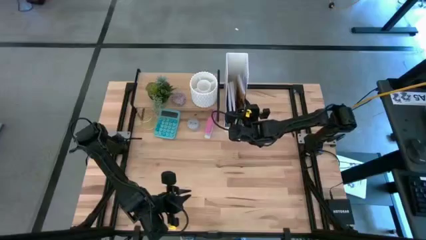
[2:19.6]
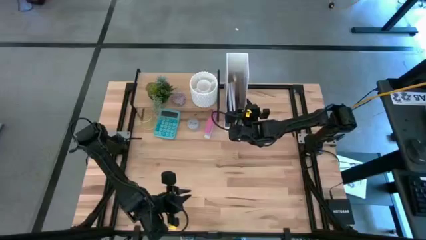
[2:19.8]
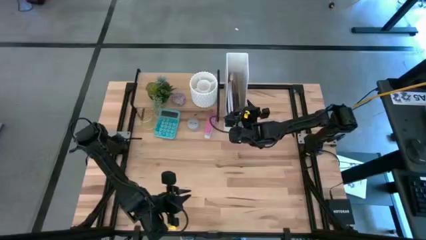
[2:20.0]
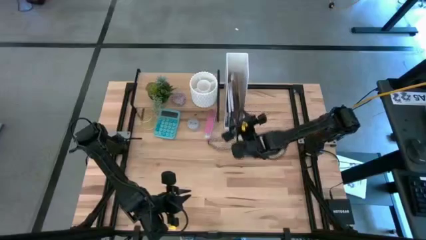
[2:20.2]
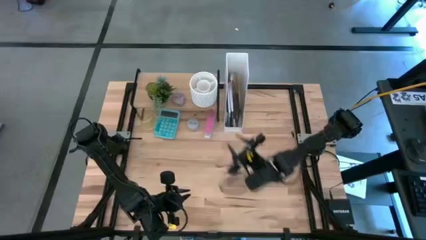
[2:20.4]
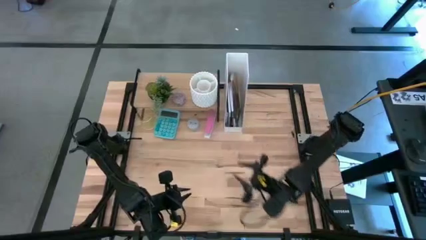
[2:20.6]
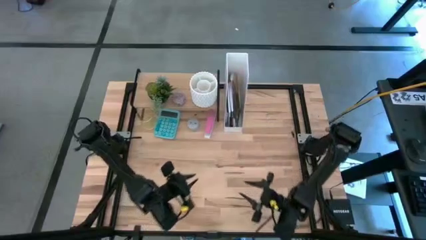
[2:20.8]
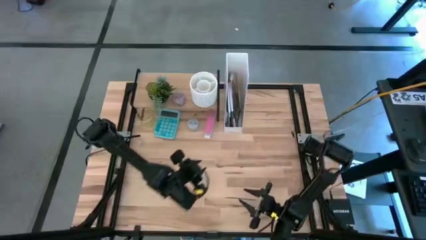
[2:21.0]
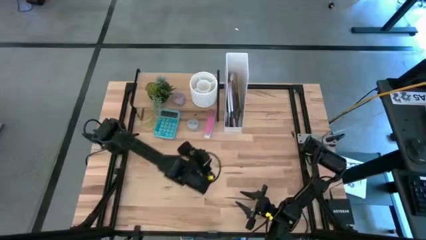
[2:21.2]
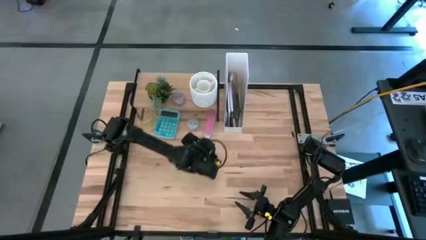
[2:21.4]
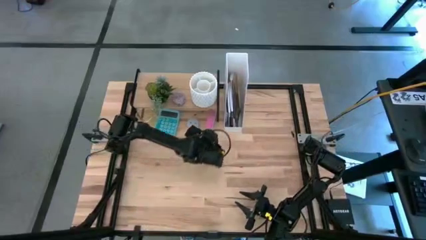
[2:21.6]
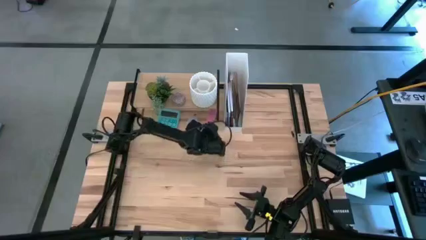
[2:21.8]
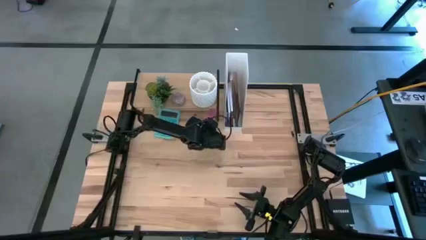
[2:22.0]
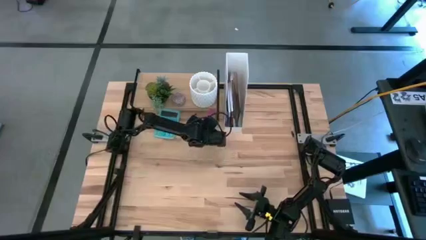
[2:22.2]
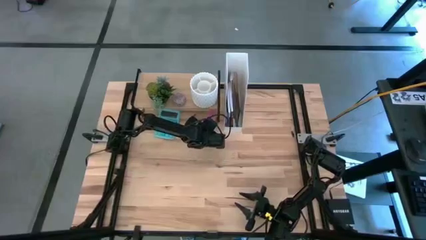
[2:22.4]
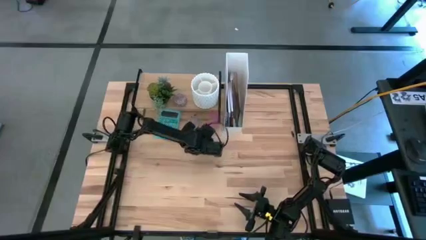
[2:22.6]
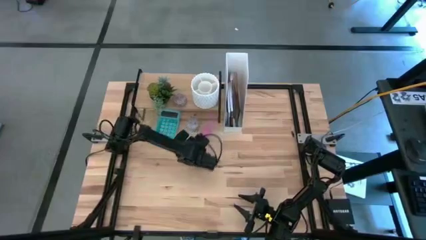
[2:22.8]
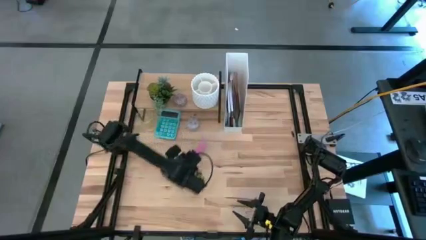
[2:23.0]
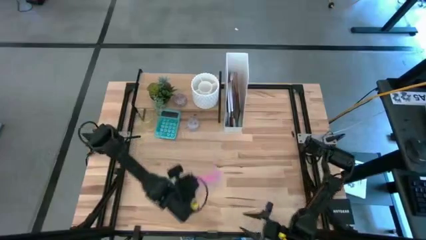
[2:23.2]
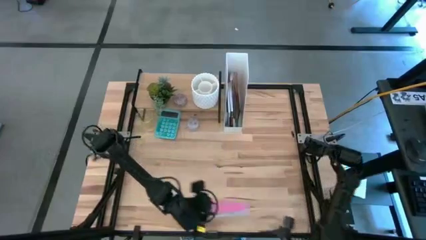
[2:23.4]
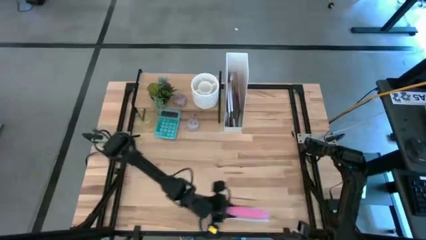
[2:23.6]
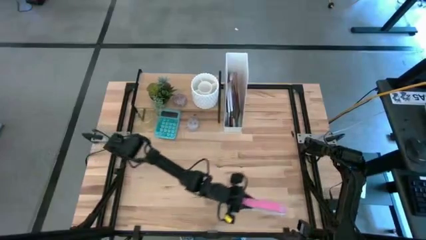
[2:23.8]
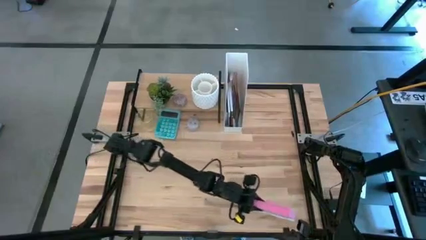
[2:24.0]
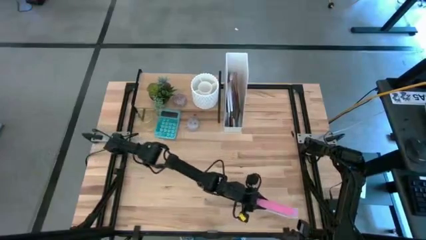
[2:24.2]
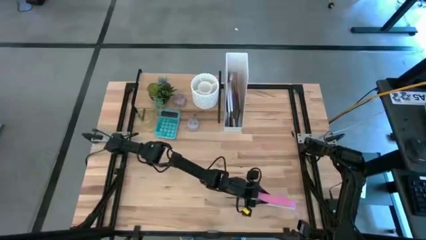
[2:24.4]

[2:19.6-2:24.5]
Task: Stock shelves
Remove the pink stapler from under the shelf

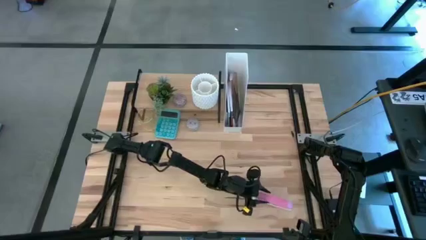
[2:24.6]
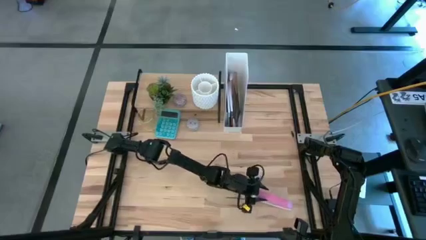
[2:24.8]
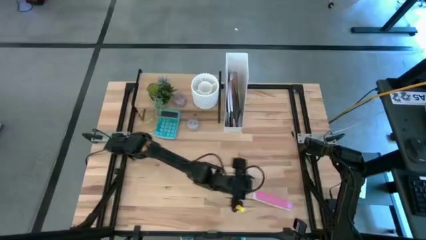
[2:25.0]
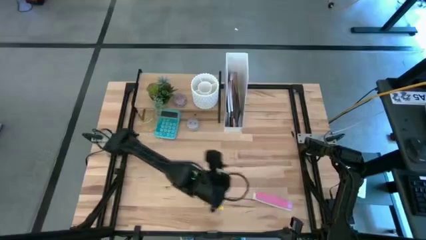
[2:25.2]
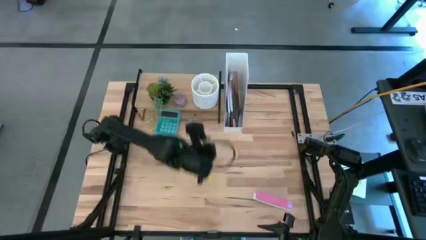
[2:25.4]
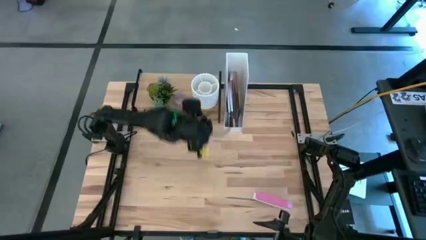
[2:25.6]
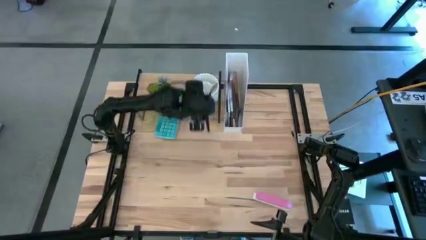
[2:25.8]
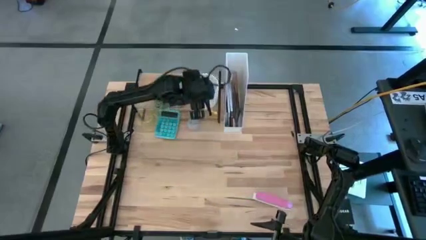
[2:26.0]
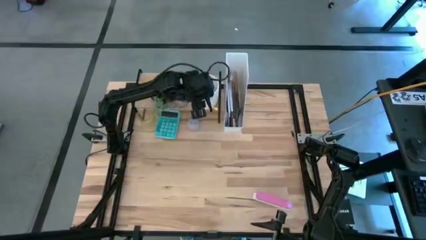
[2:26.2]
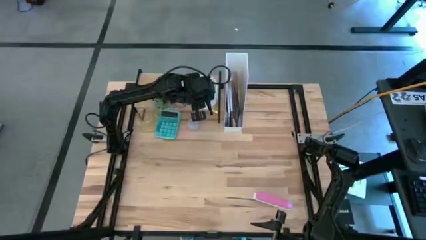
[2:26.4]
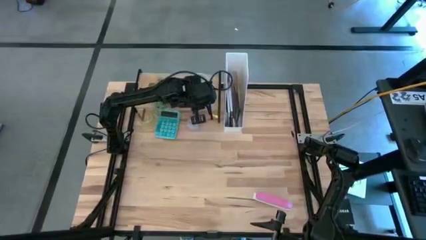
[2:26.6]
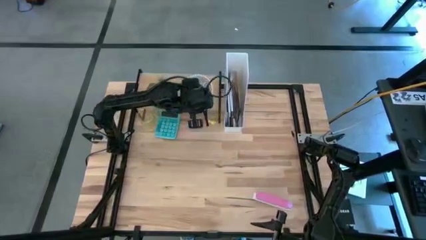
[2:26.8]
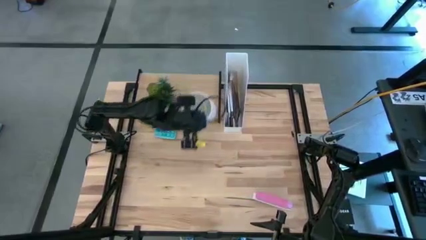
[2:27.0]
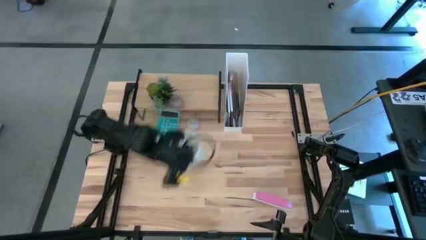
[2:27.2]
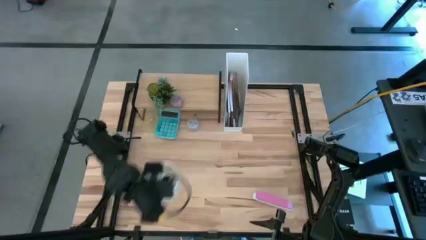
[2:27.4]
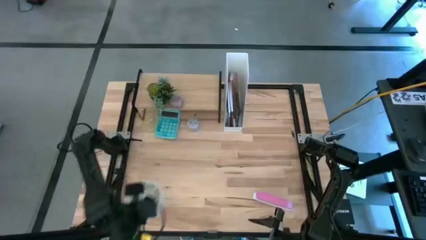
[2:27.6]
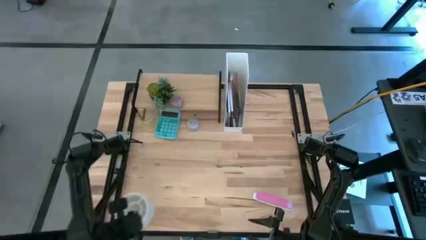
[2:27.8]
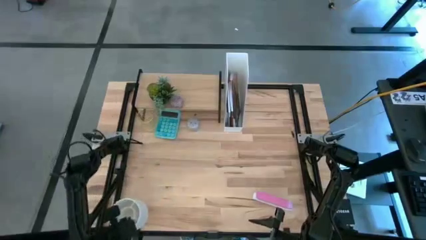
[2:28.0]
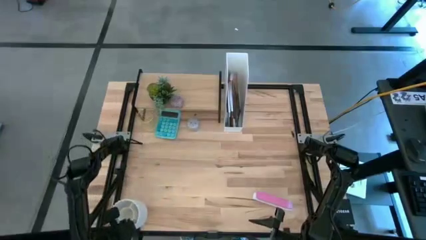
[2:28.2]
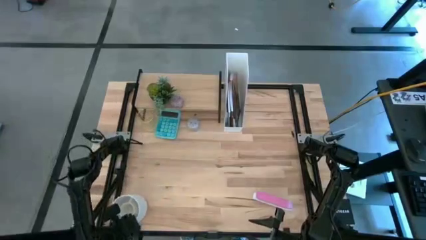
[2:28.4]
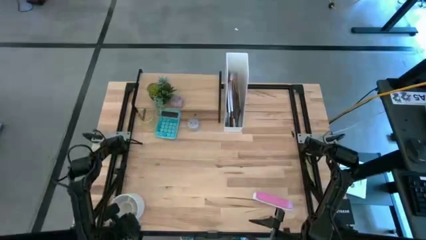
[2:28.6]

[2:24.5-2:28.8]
Remove the white pen organizer from the shelf

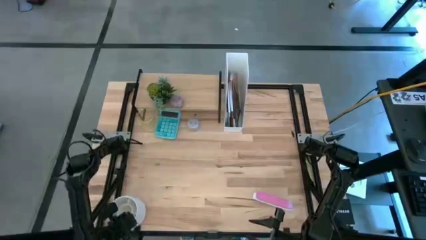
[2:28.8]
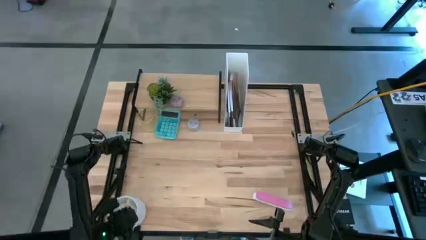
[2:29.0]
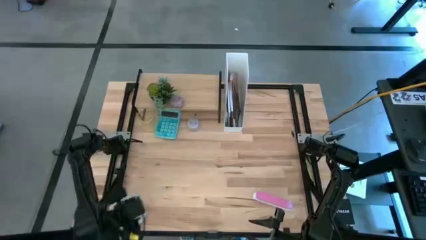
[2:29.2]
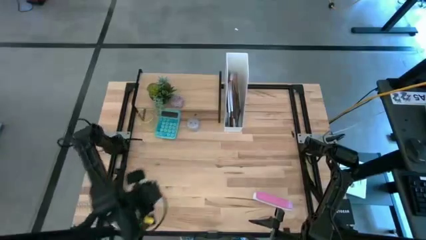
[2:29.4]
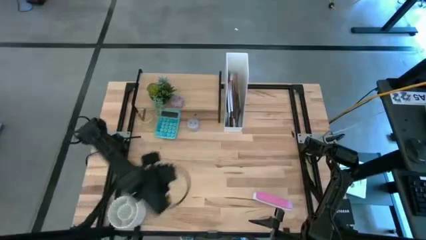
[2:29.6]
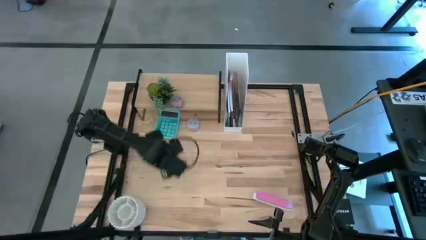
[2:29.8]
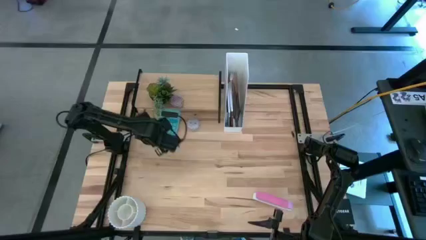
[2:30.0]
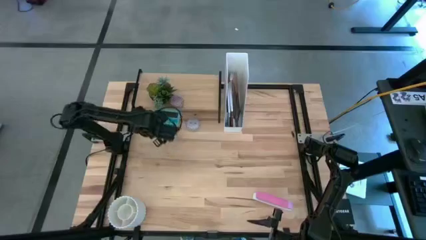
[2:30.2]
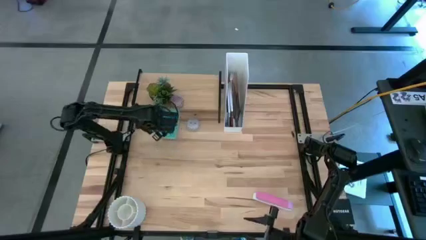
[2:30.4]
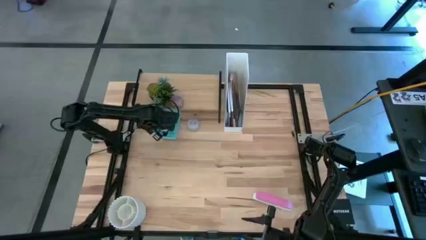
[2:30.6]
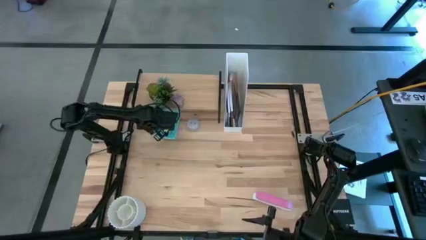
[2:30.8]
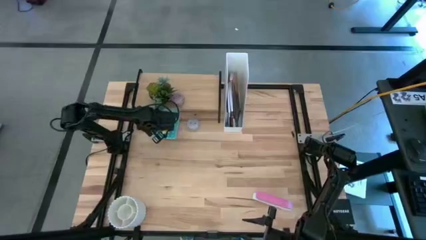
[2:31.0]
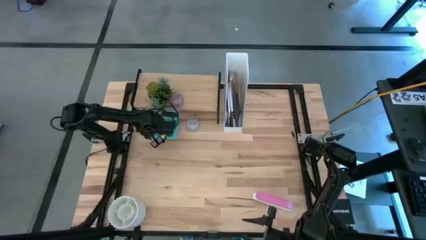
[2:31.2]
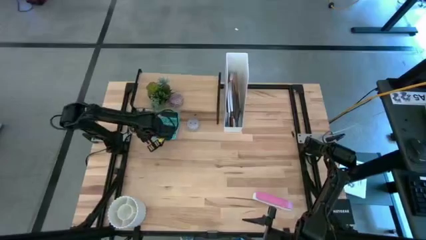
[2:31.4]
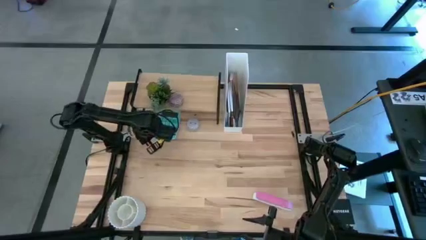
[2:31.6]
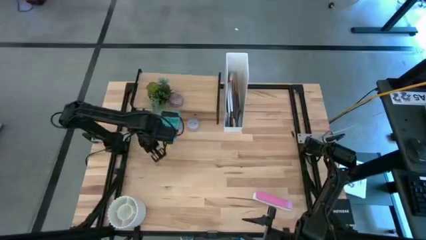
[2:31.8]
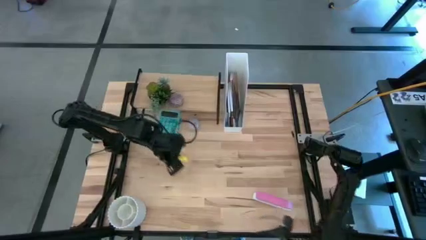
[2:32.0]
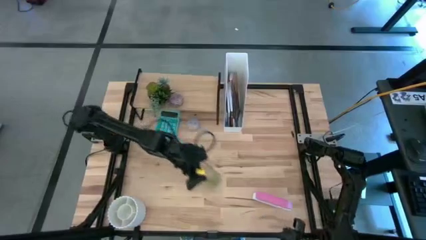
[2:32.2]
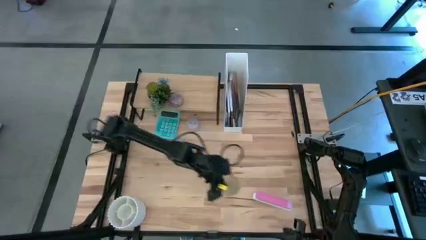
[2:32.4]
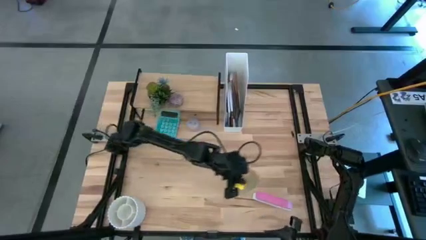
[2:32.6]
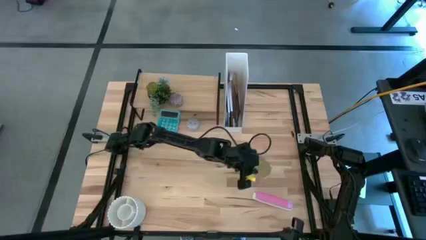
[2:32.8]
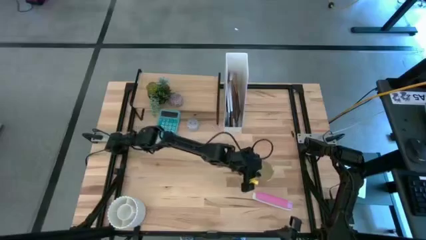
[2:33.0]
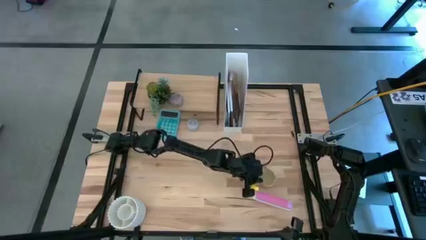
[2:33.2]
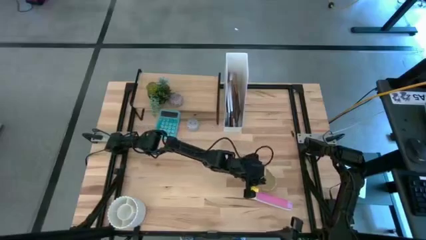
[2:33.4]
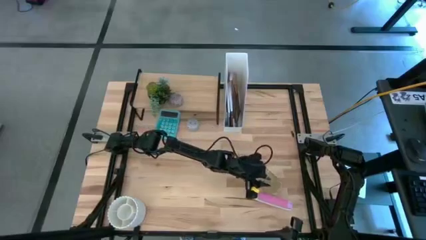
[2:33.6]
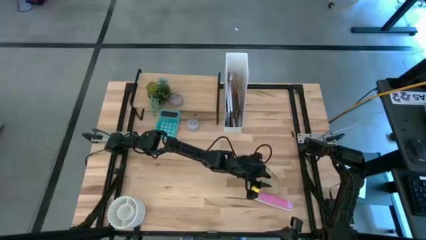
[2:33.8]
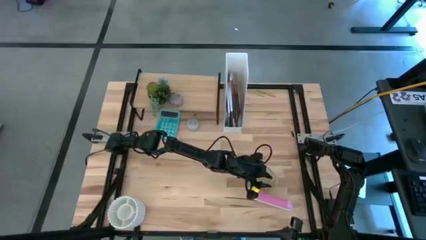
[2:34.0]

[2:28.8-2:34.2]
Remove the gold pen organizer from under the shelf

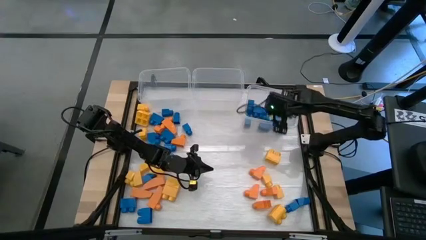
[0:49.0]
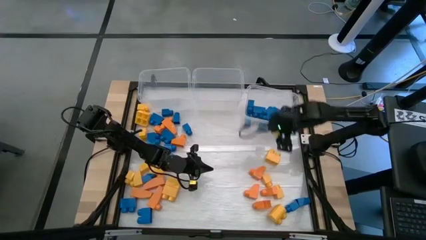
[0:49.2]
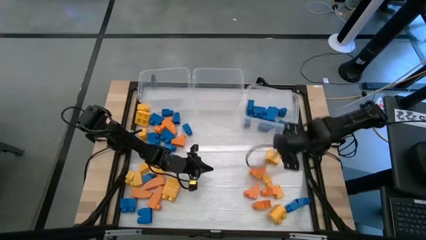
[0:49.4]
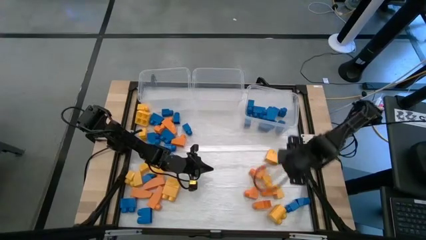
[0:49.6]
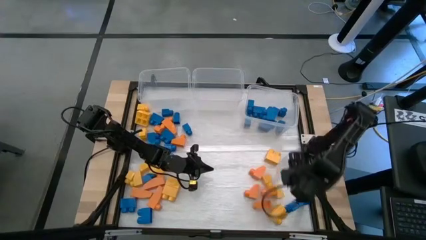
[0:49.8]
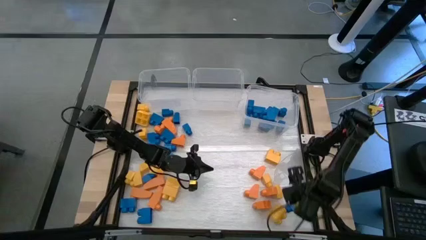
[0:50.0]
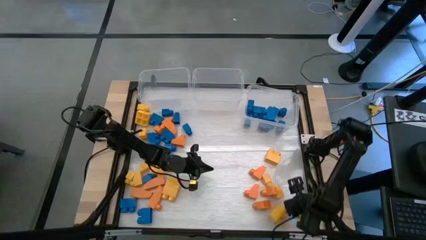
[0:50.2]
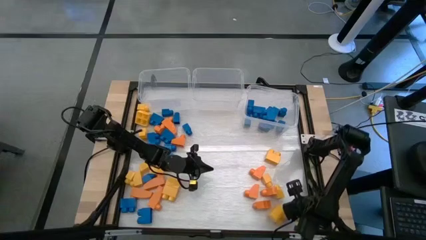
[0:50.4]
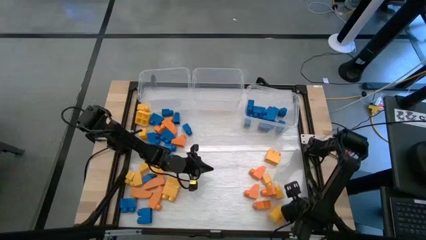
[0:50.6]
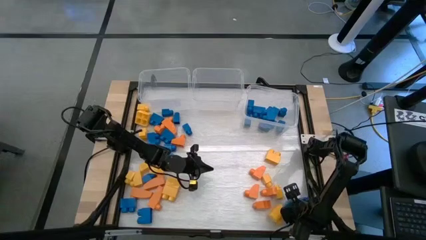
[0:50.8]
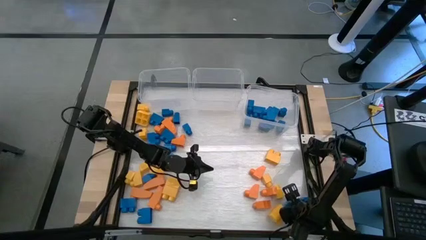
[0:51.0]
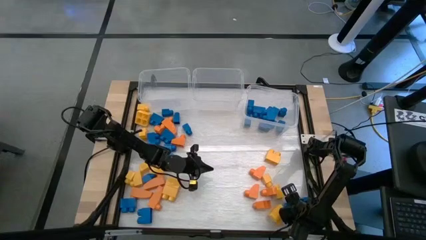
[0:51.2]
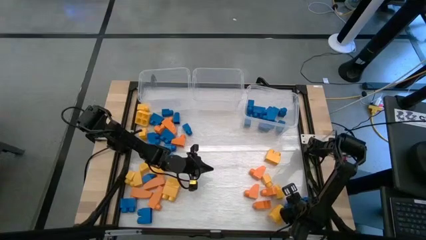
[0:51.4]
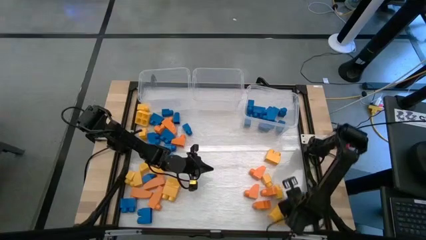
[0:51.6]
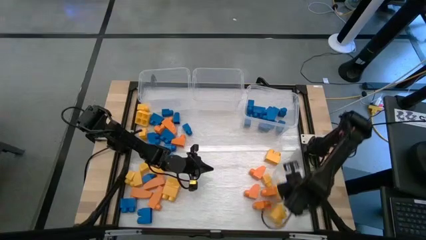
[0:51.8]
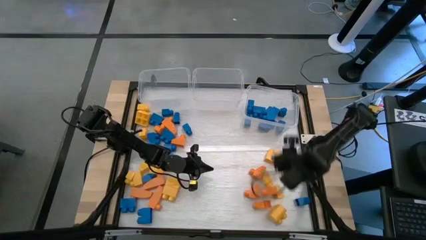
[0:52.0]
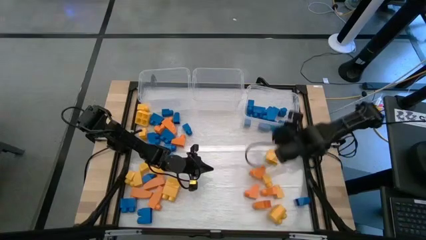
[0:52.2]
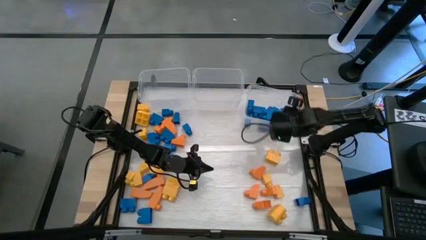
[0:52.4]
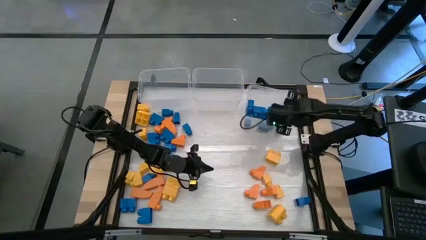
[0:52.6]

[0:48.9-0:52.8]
Task: Sort blocks
Put the blue game piece into the right transparent bin
